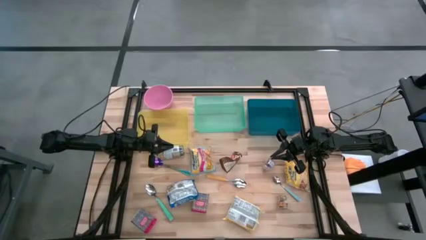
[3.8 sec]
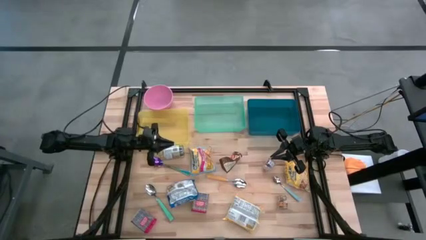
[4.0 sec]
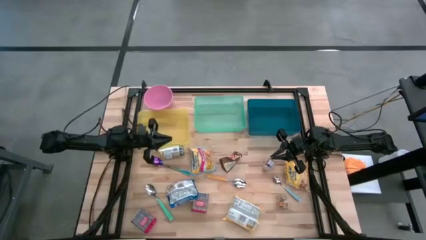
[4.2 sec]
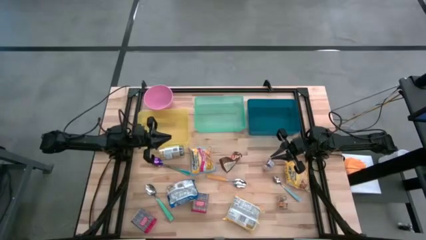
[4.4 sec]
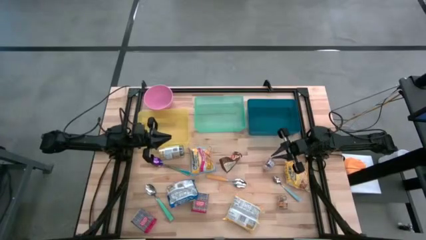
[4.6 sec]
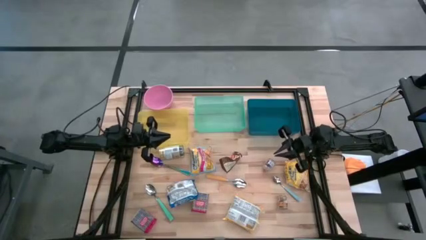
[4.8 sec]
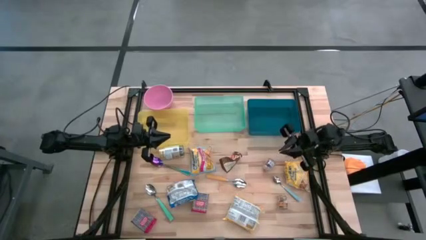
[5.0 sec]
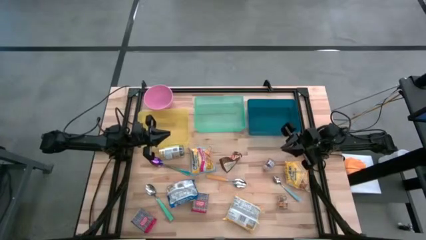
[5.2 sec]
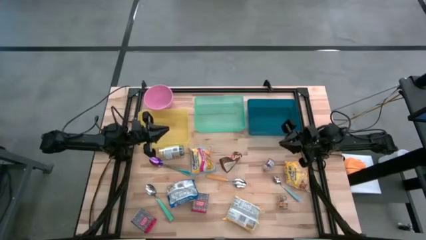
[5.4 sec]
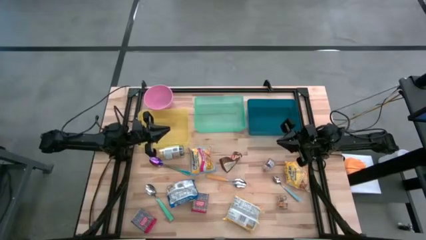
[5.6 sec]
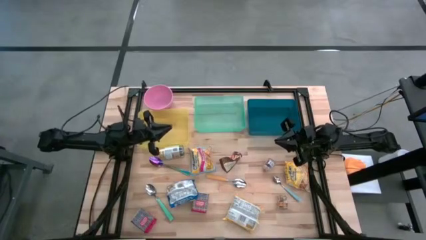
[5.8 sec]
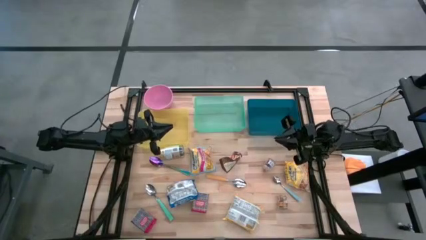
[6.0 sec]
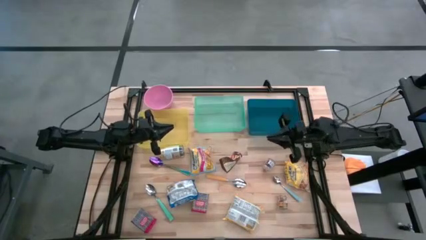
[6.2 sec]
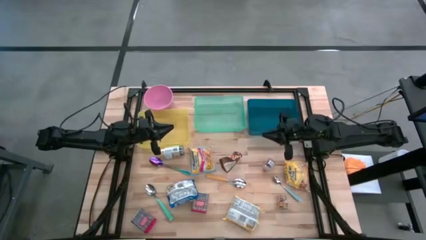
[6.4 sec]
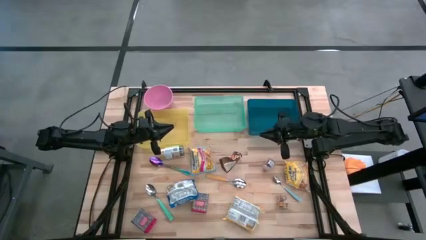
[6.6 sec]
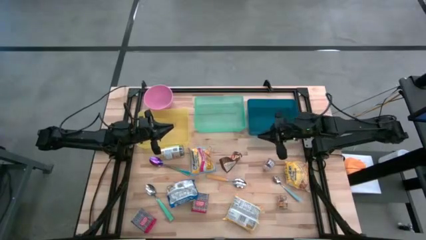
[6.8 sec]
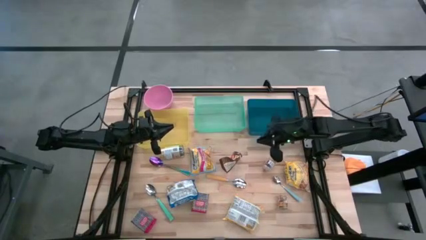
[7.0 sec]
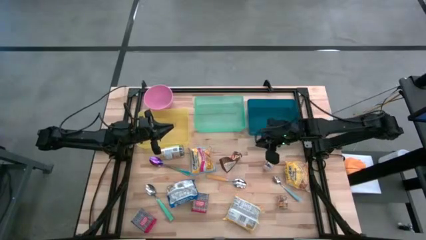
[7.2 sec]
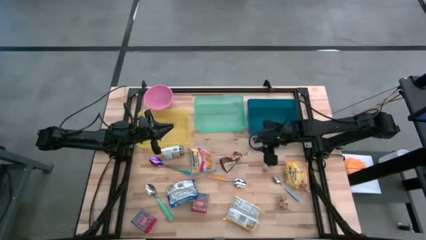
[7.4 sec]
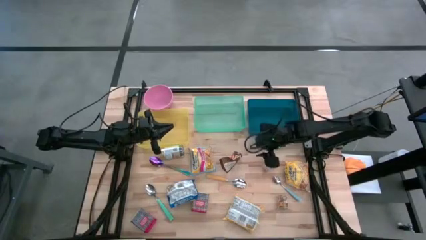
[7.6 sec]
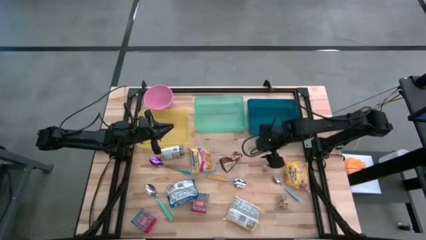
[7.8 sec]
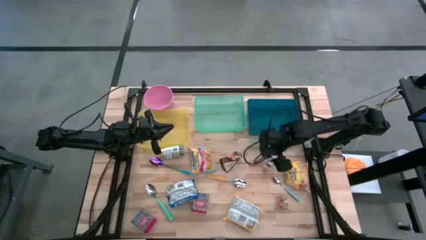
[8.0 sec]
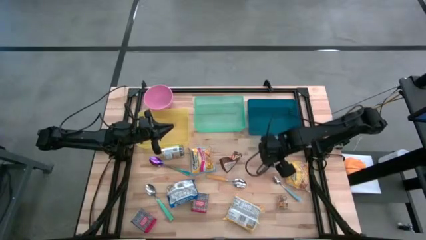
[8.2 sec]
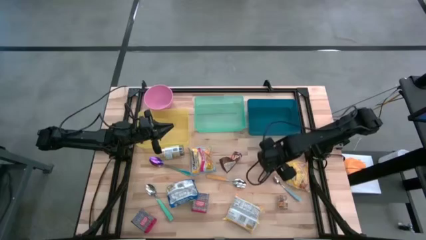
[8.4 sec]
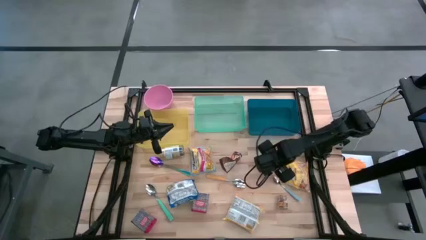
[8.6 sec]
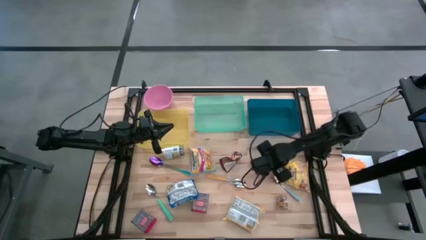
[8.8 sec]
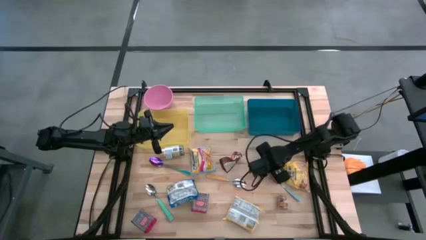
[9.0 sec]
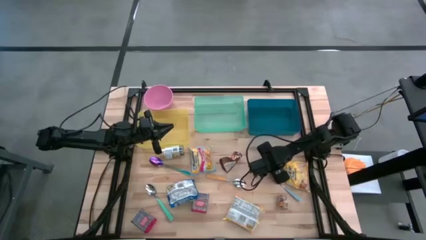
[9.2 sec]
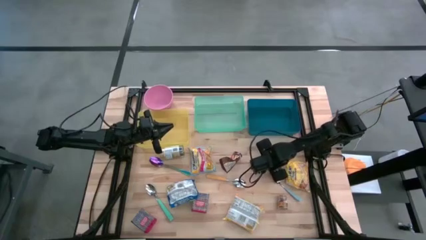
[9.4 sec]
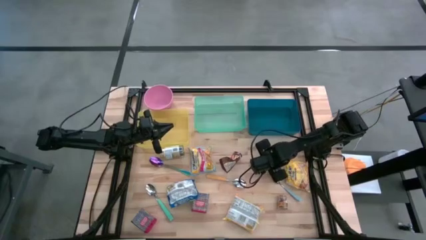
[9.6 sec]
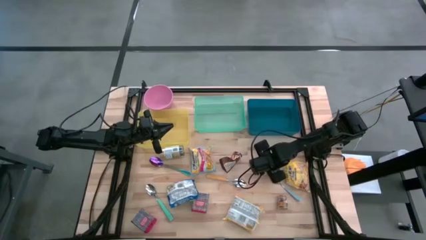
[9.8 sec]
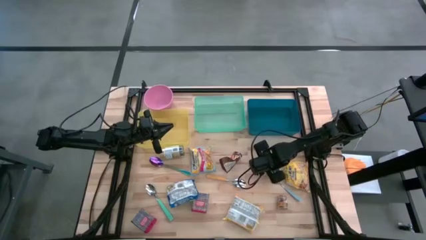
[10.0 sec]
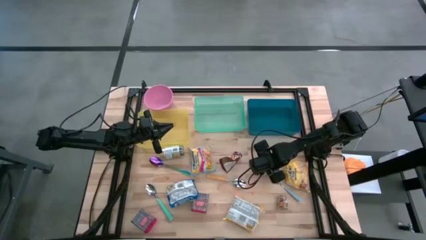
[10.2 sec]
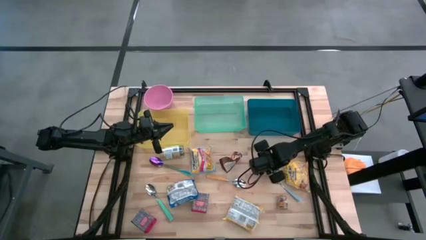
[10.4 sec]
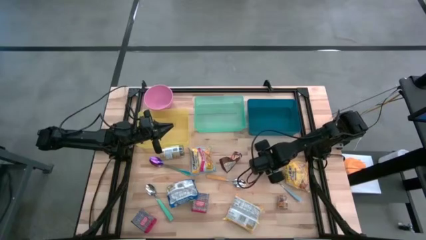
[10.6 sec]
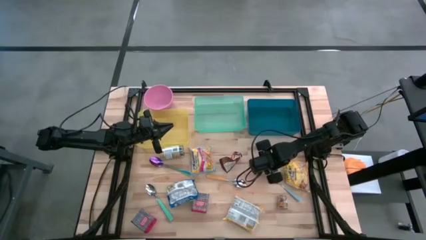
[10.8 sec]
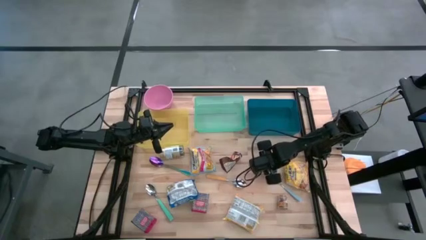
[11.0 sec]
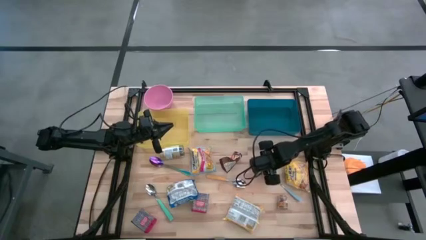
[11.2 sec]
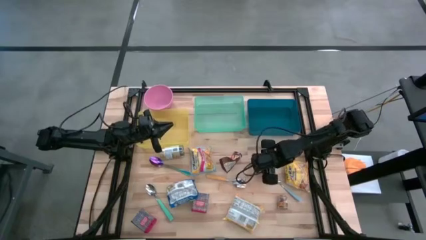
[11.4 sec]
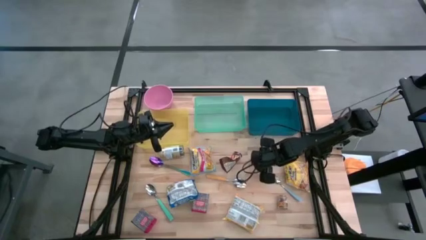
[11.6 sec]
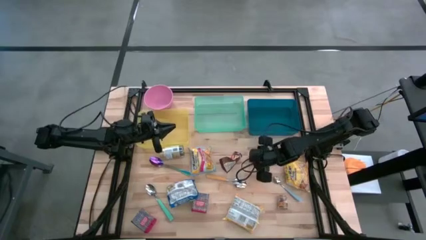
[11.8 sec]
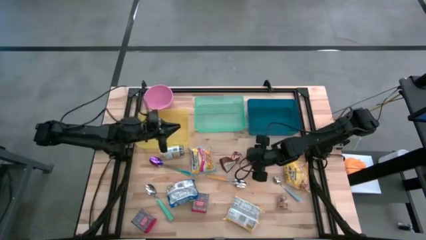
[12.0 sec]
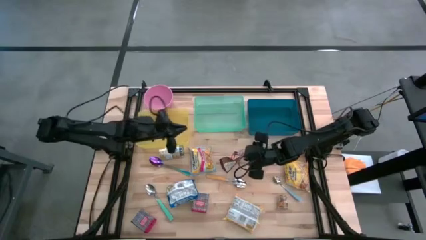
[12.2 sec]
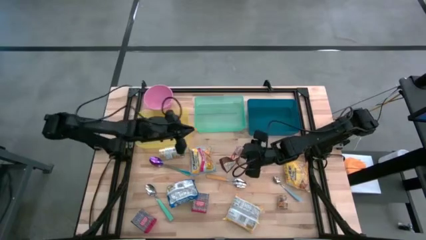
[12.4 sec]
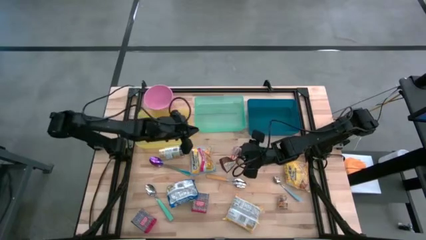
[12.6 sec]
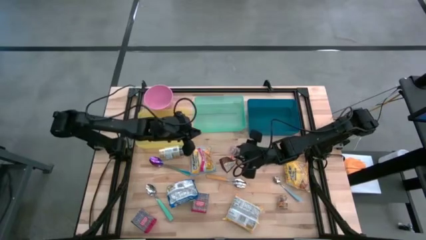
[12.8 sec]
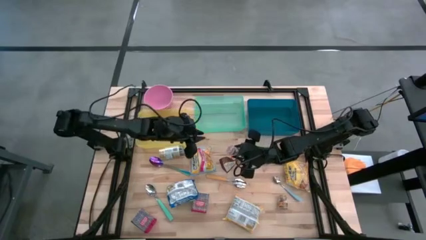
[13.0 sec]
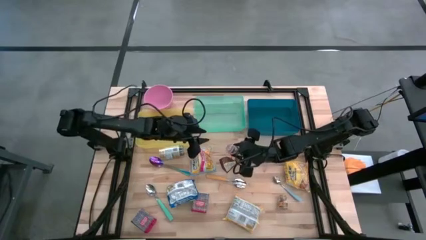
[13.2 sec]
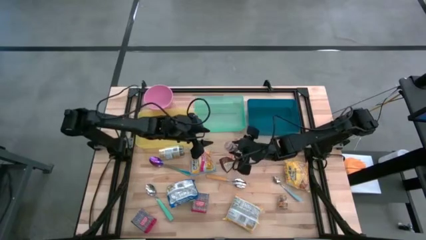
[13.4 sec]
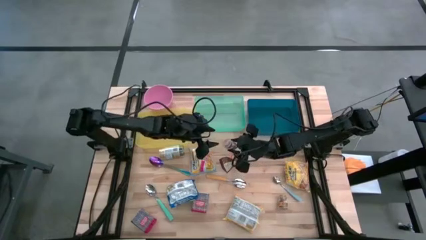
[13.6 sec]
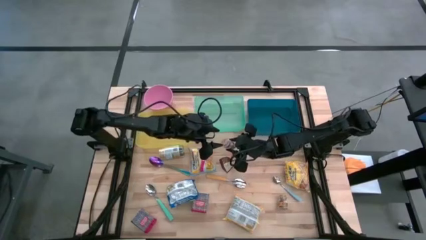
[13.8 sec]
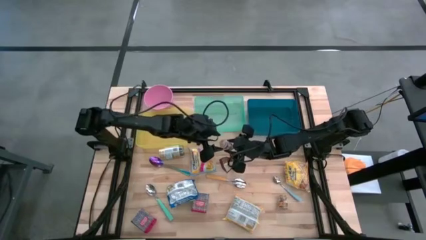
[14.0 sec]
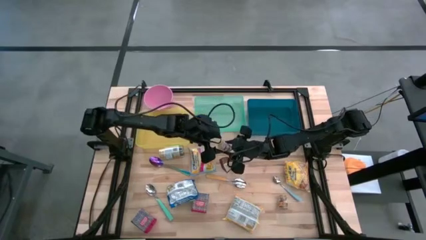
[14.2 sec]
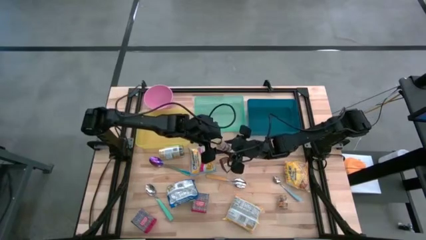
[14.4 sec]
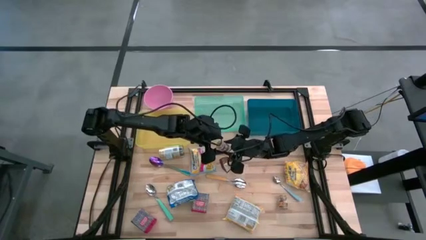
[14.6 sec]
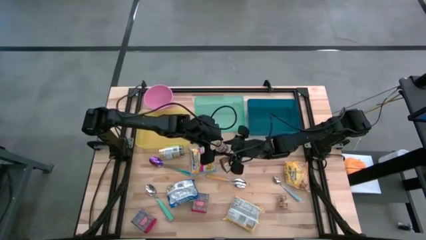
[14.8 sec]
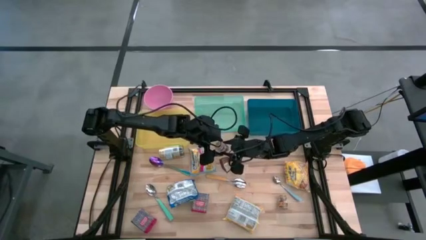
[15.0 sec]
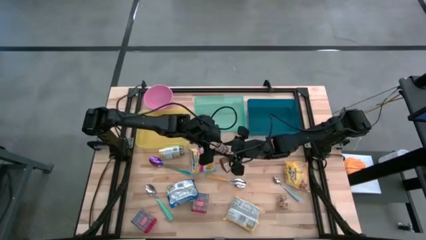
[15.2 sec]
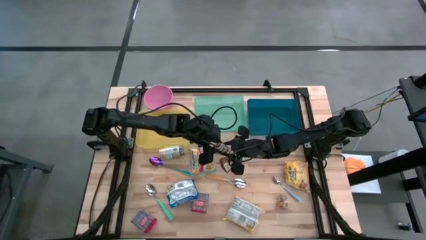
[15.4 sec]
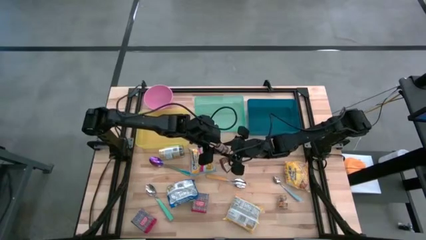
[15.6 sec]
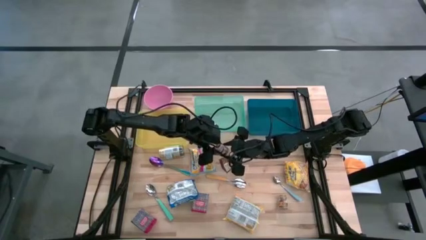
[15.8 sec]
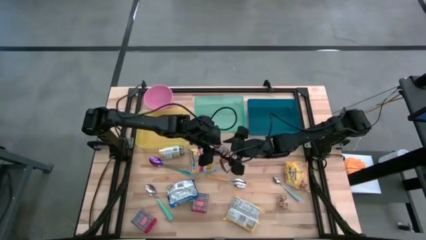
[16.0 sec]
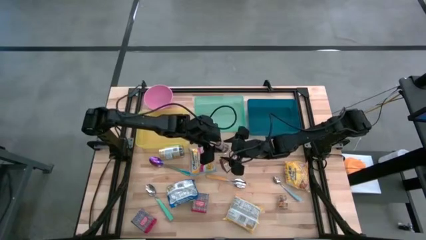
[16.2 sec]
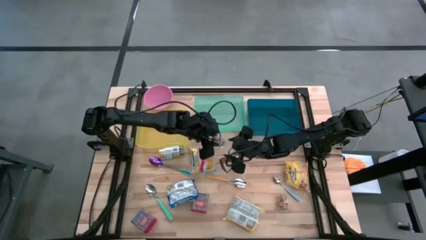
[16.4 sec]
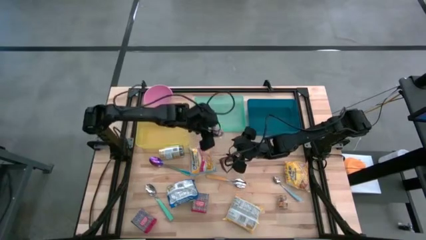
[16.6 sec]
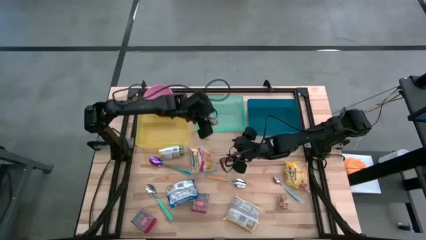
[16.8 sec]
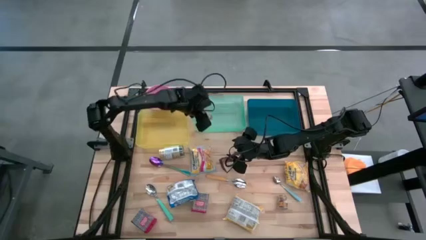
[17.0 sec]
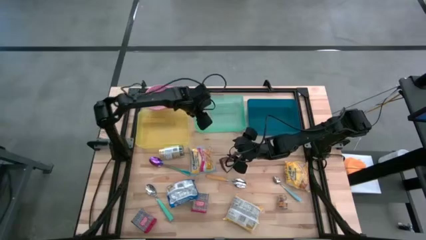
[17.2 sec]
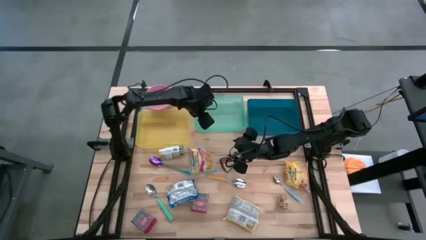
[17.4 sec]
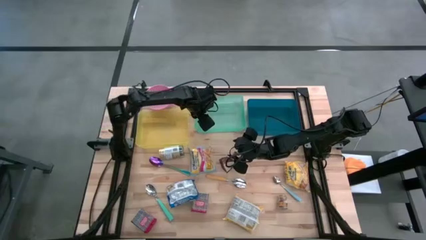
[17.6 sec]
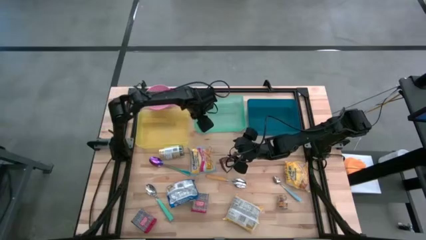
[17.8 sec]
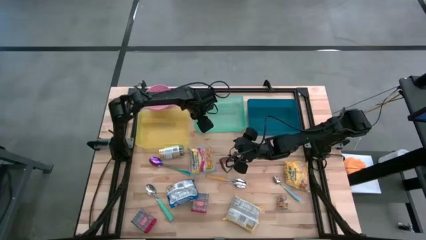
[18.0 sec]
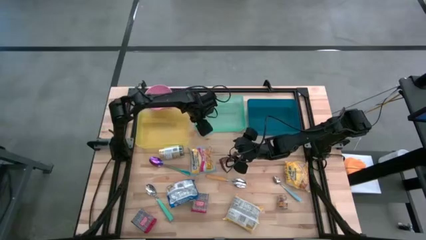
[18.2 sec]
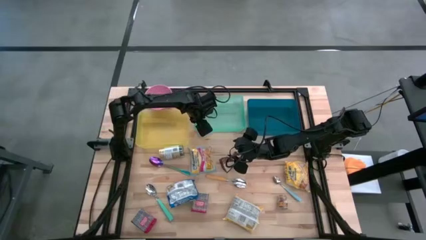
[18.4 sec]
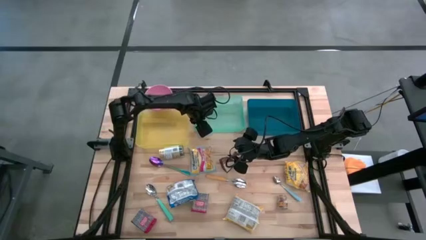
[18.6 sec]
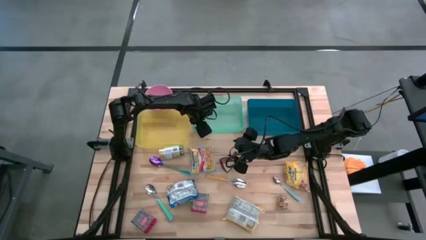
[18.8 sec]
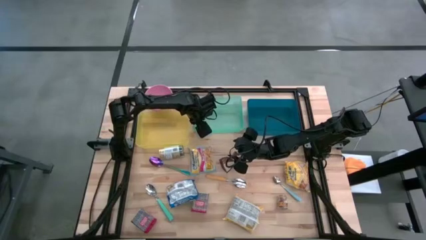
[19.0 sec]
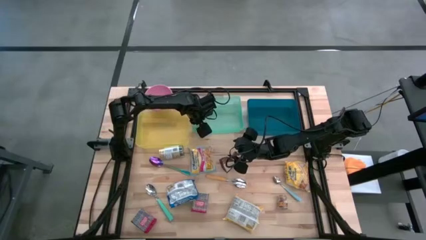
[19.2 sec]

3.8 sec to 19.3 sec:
Put the top brown seasoning bottle into the green bin
